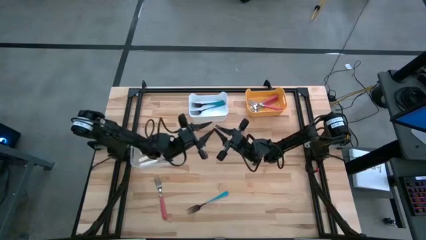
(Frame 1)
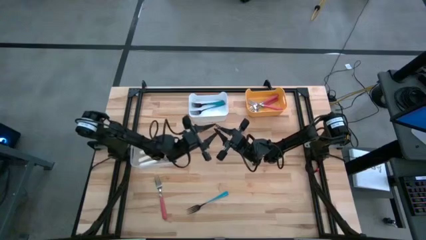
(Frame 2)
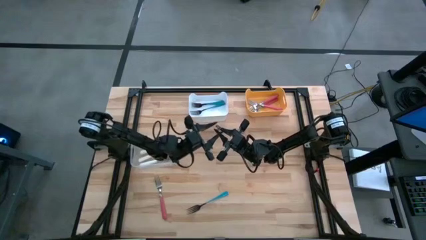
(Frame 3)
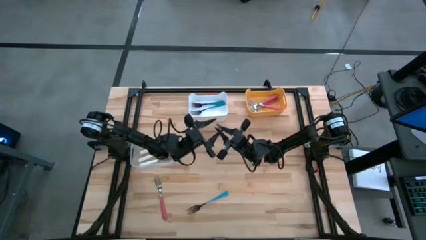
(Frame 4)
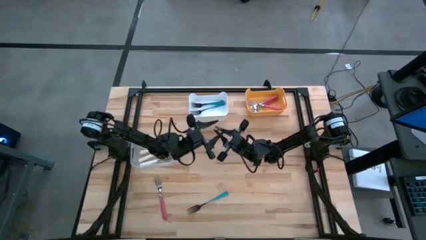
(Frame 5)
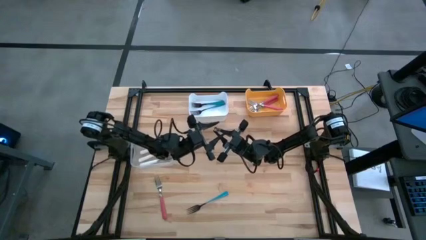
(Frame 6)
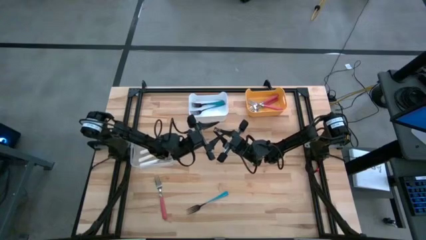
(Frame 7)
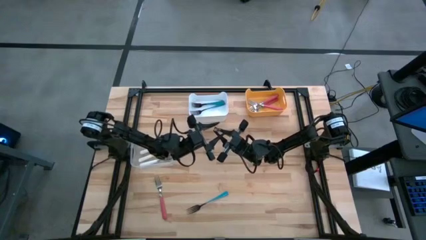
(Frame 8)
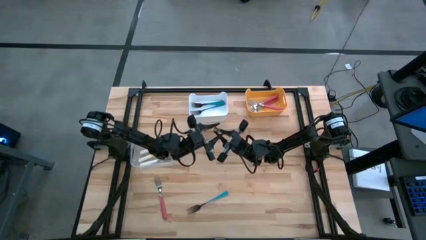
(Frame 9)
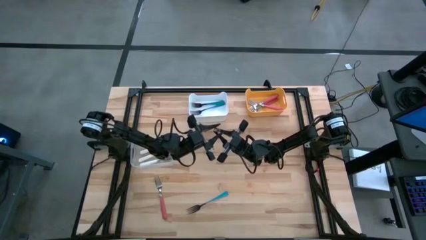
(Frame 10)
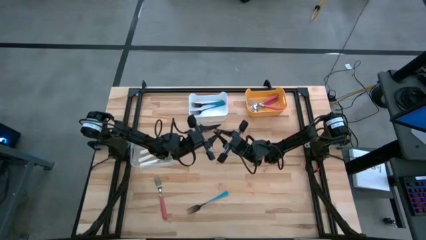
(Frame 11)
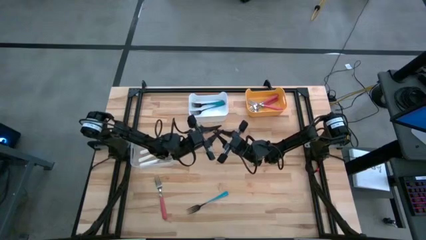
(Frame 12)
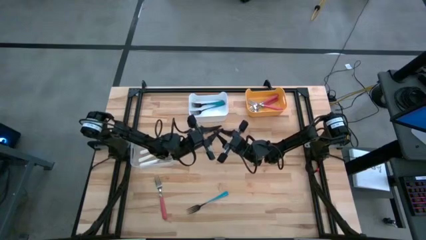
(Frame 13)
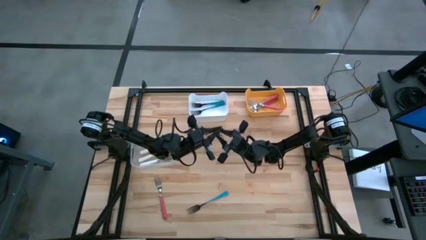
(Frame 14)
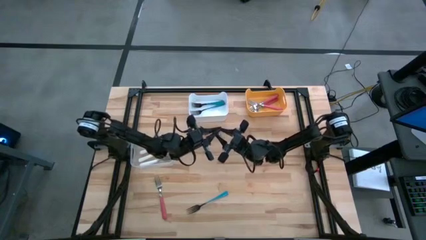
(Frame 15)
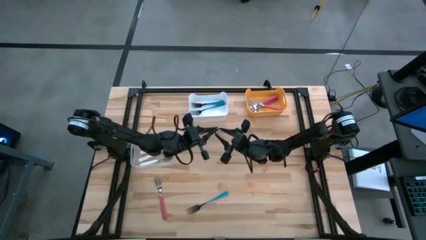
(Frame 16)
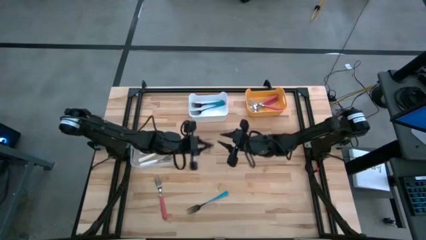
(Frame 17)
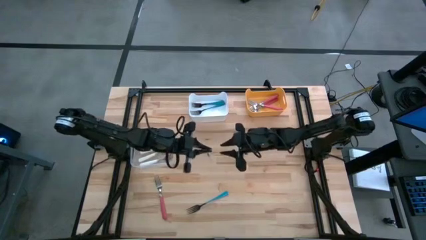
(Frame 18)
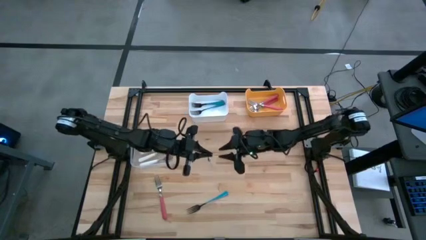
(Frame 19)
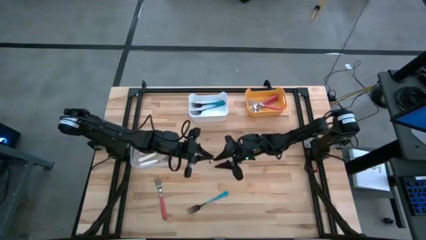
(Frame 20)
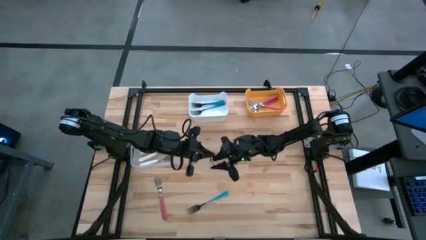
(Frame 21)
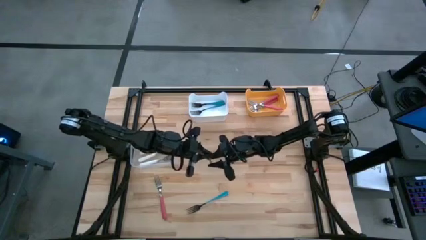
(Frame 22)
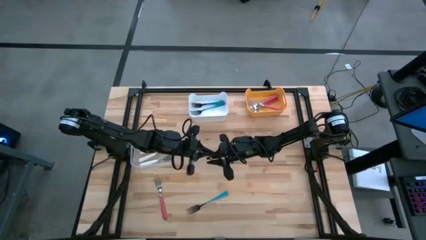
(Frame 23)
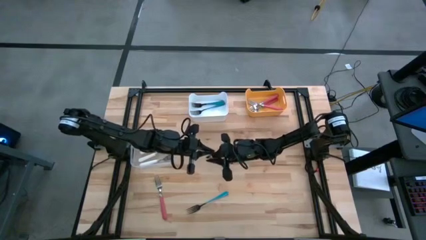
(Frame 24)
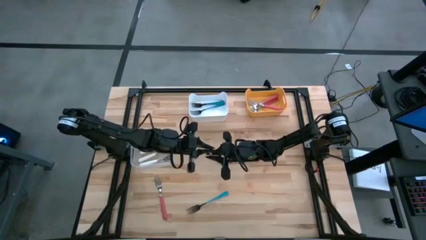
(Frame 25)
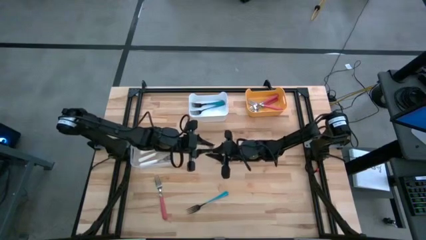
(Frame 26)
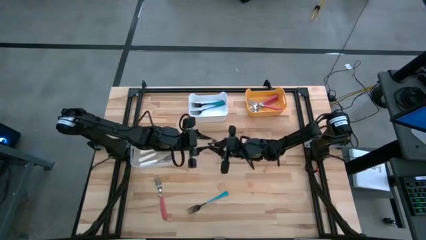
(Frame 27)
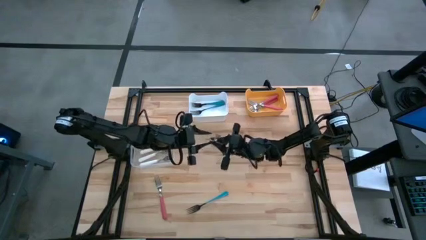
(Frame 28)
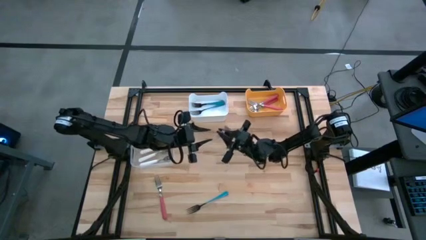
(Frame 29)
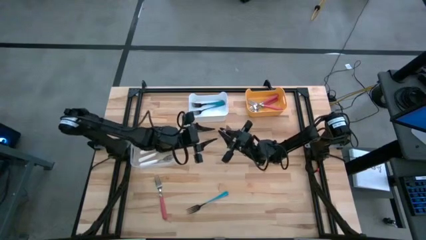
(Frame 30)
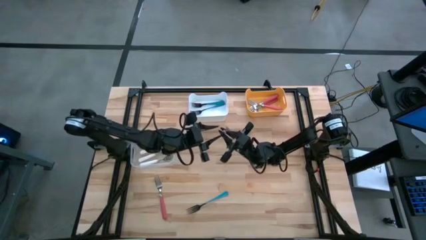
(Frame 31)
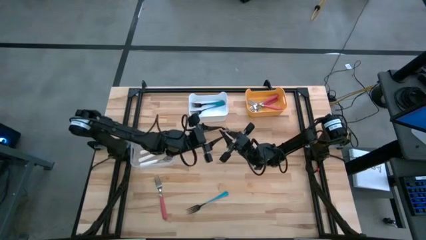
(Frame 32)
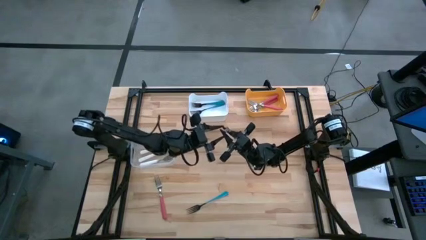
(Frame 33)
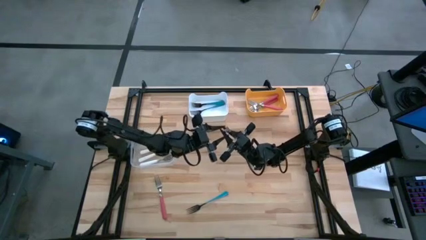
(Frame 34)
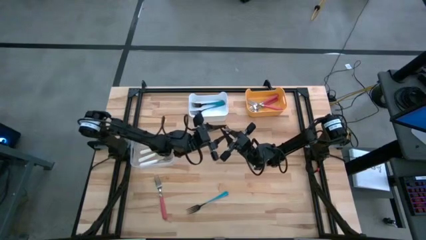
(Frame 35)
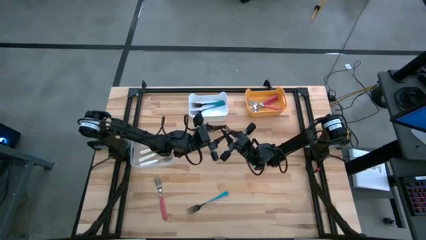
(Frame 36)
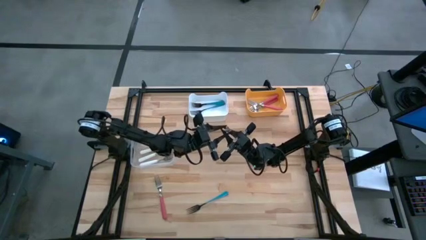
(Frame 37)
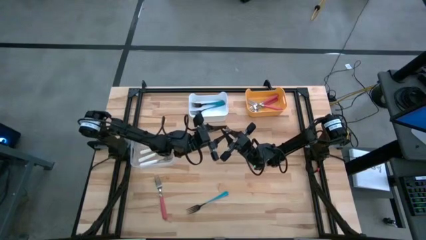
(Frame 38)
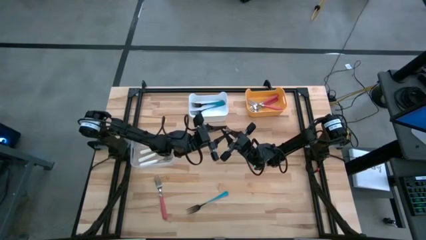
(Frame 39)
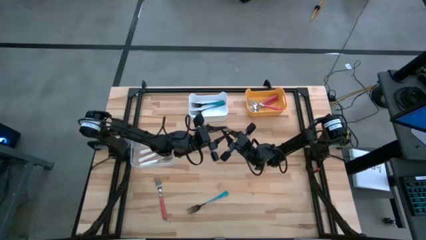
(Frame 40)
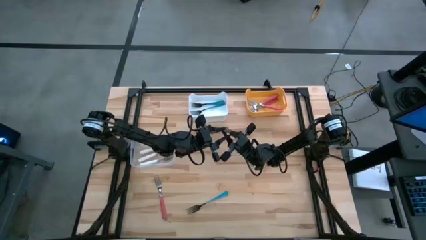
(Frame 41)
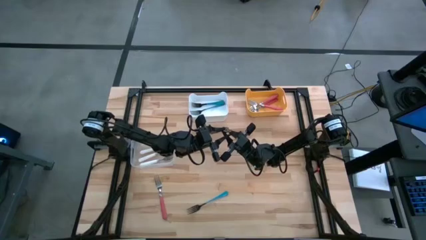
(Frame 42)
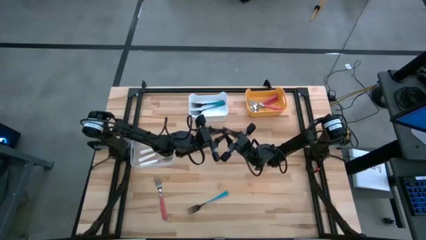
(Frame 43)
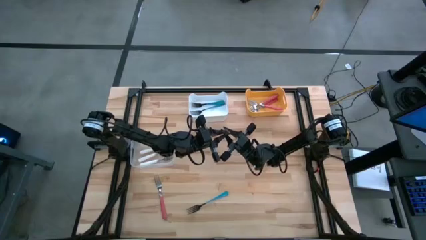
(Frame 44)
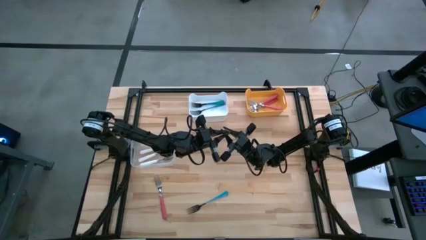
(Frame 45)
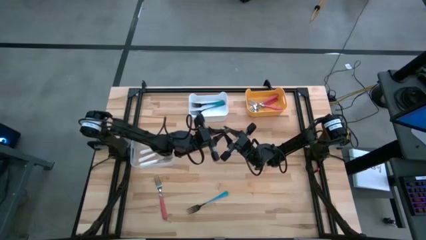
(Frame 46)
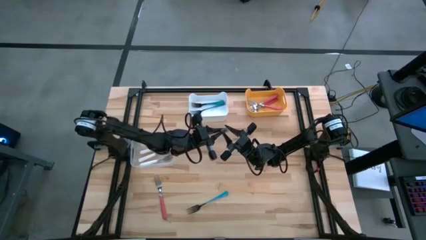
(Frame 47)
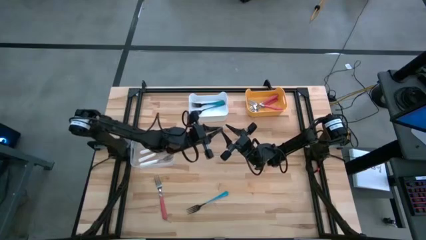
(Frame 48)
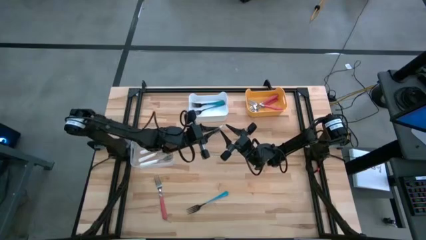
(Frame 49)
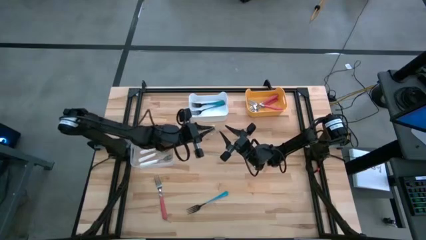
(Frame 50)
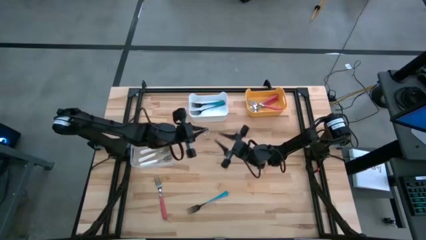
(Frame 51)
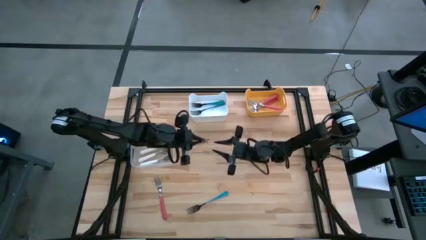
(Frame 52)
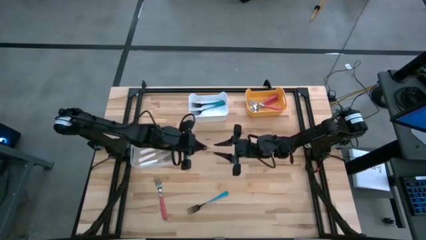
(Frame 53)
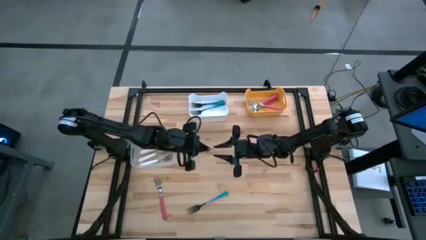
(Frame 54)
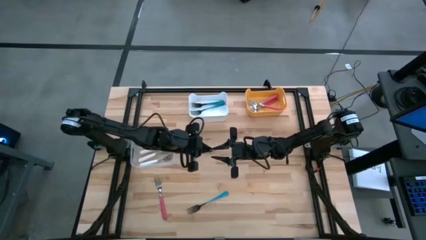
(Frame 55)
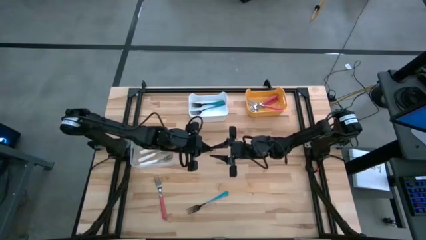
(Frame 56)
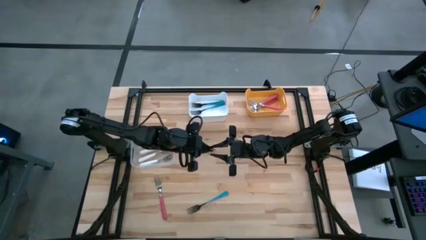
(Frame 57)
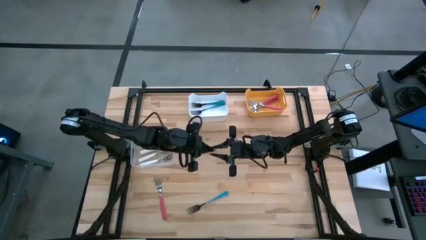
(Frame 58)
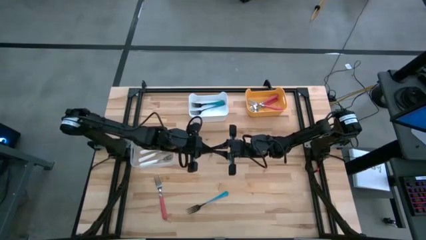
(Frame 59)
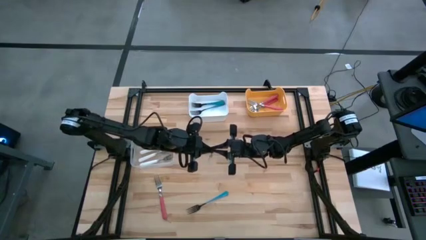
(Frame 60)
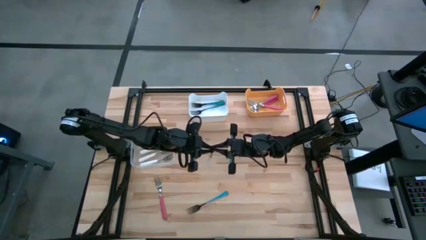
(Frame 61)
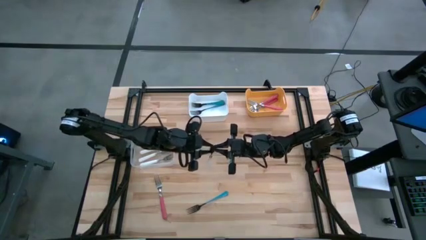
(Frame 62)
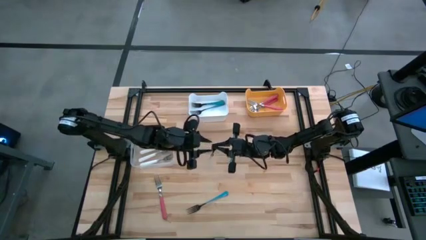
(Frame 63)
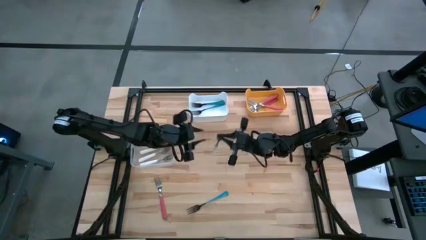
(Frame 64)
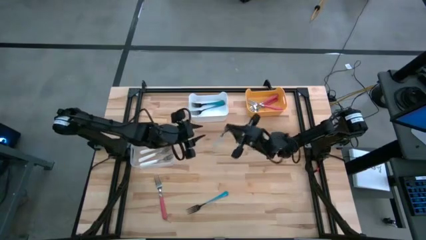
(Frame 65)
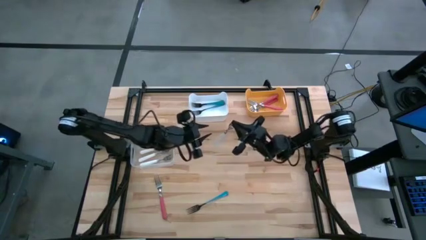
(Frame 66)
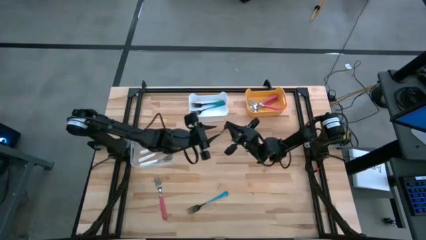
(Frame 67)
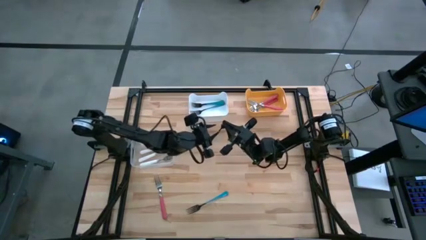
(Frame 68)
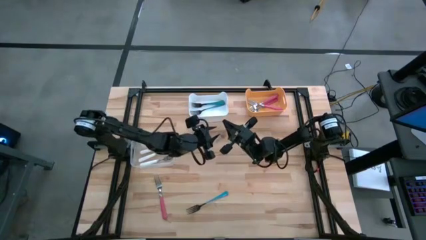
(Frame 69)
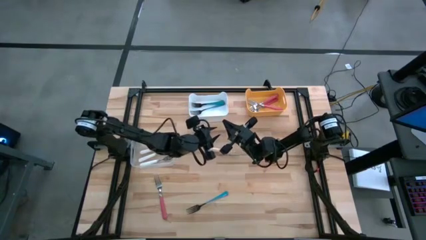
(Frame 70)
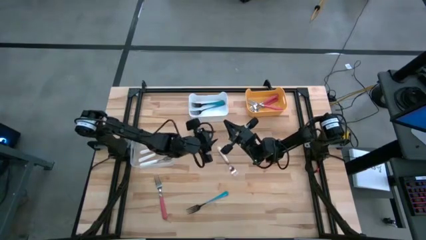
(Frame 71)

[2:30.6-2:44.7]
Task: Sort silverware by color (type)
Put the white fork into the transparent bin

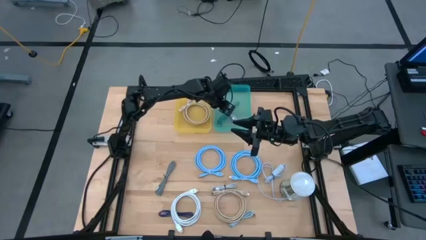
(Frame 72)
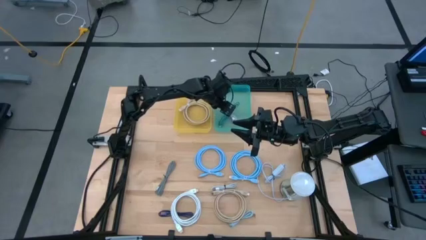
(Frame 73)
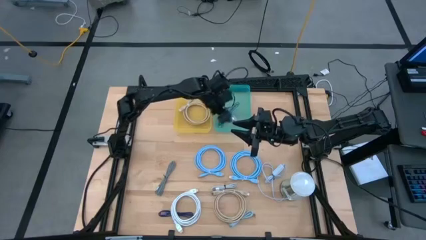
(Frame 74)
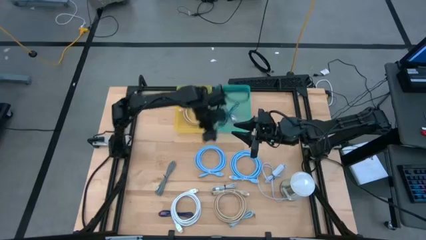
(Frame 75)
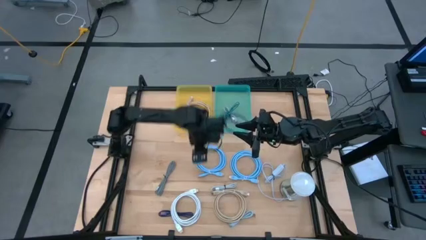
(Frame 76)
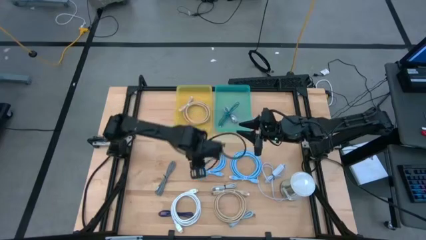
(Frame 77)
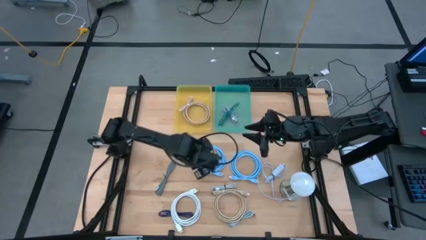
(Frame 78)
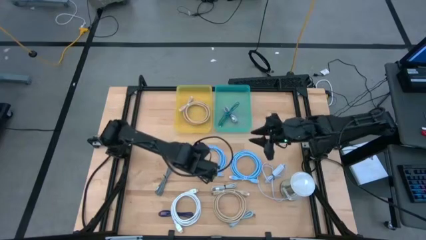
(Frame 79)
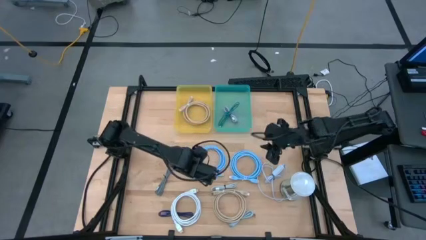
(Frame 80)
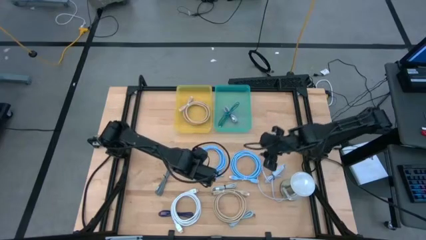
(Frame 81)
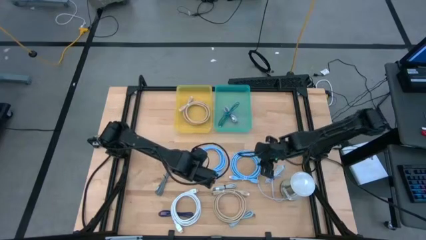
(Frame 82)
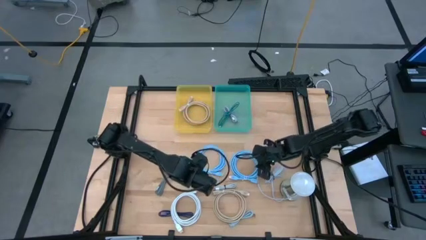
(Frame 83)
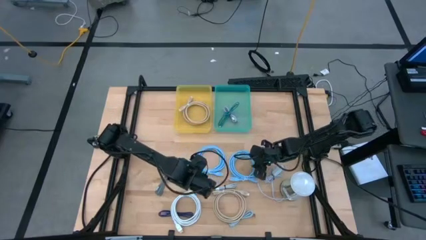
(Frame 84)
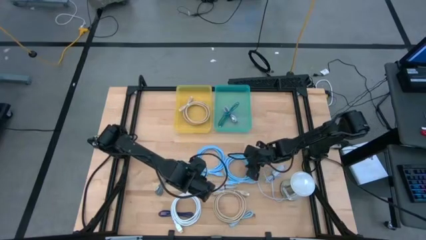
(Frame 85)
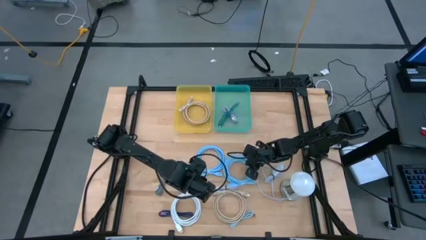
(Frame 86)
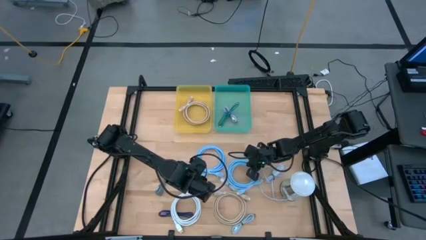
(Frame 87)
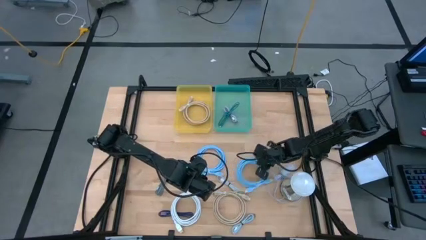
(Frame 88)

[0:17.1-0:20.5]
Task: Pick & Place USB Port
Put the right blue HDMI cable into the yellow bin
